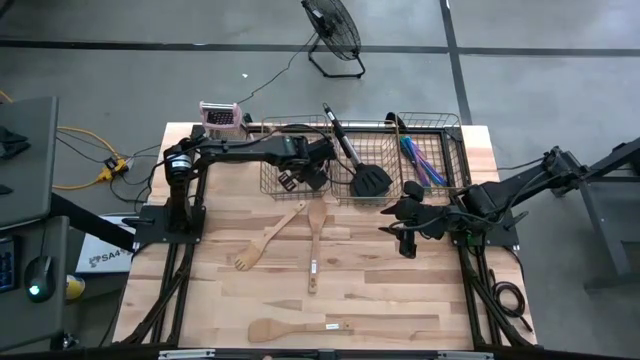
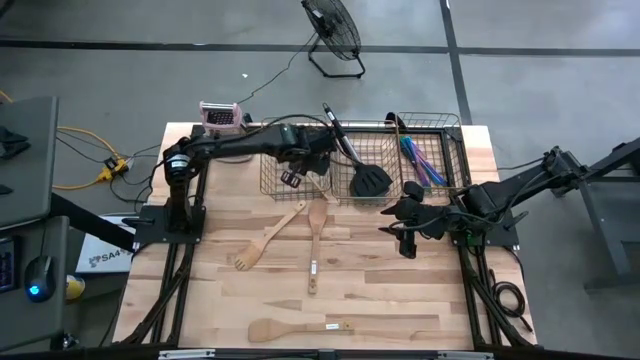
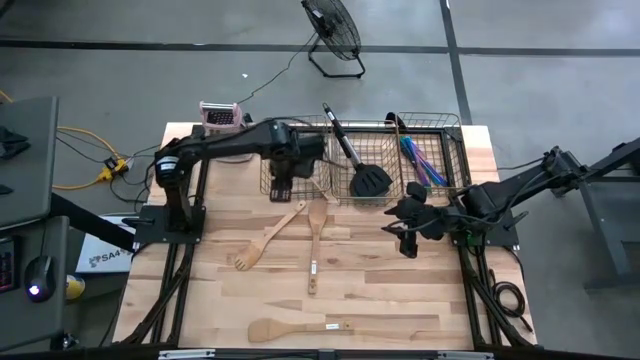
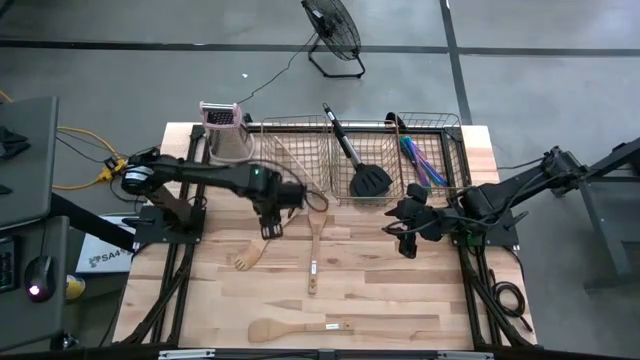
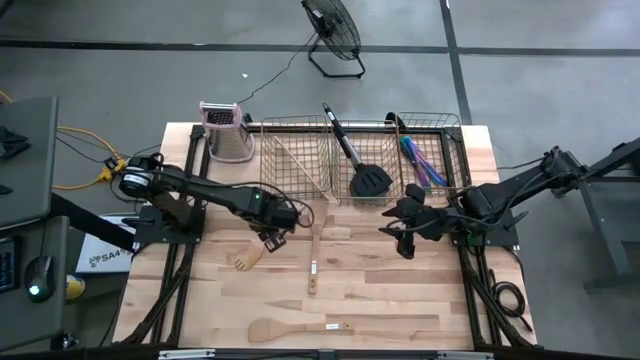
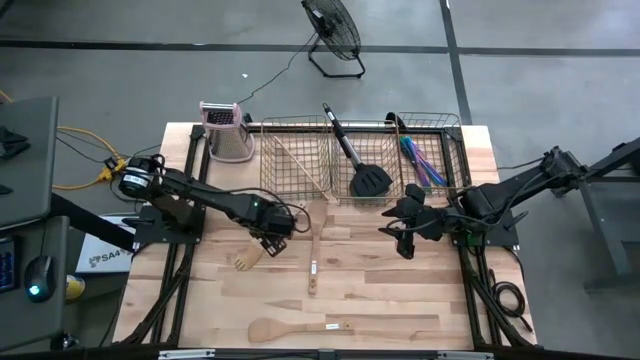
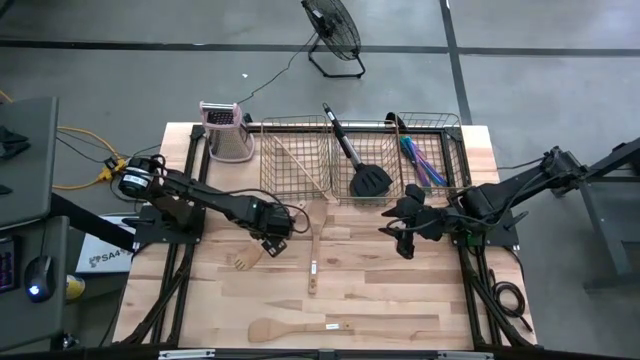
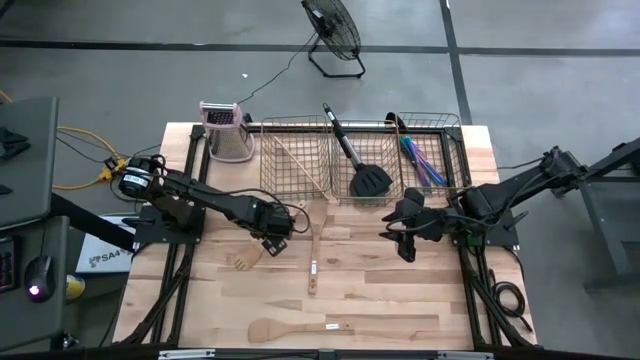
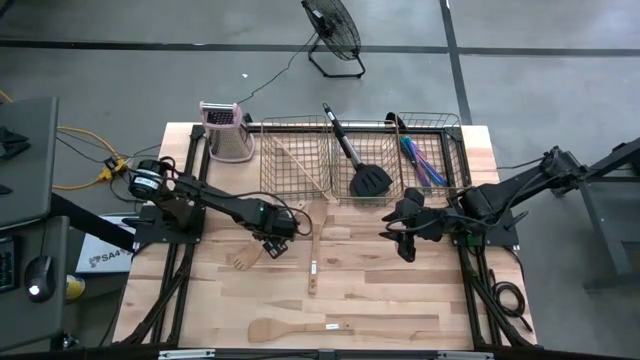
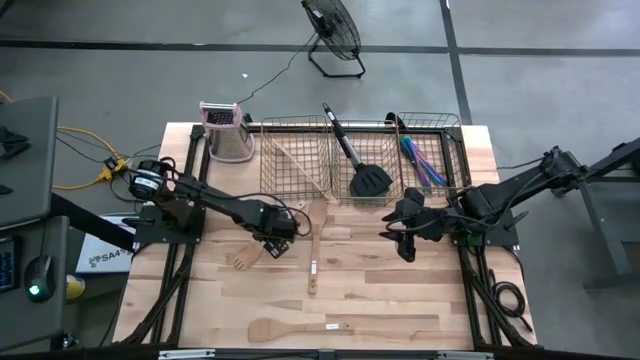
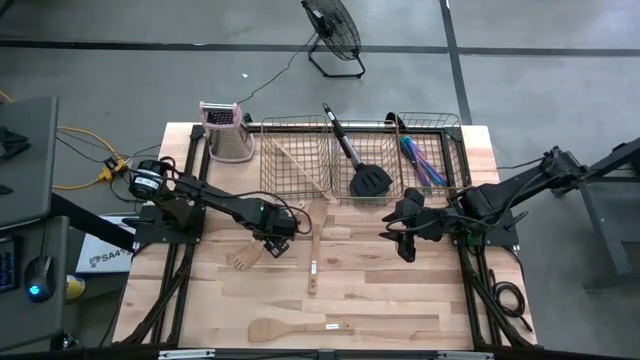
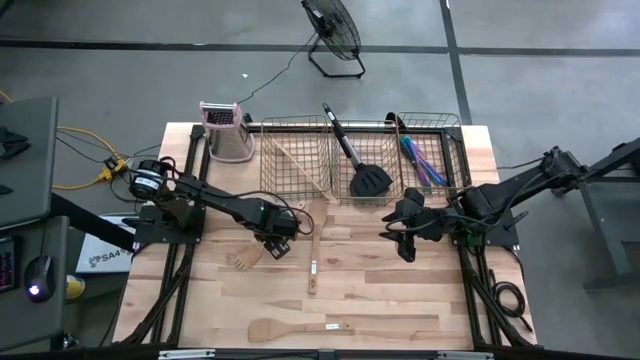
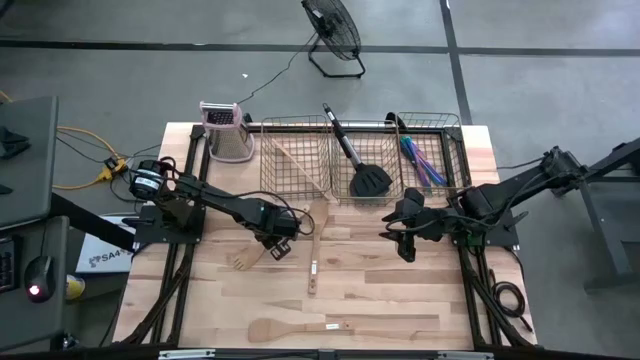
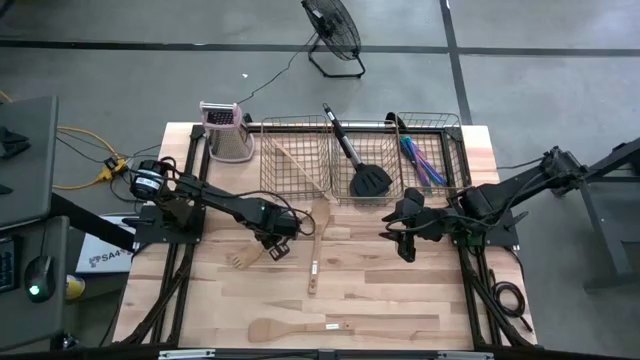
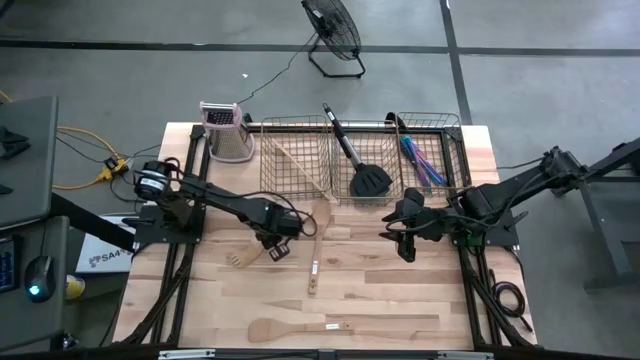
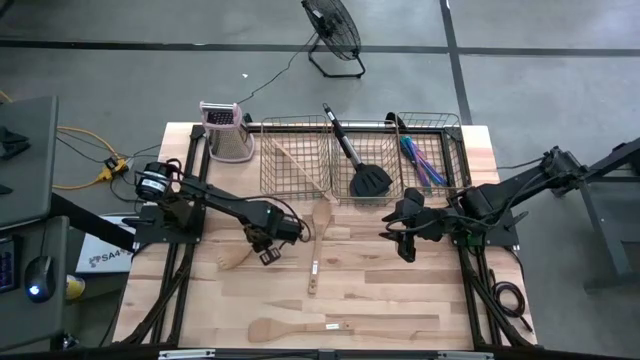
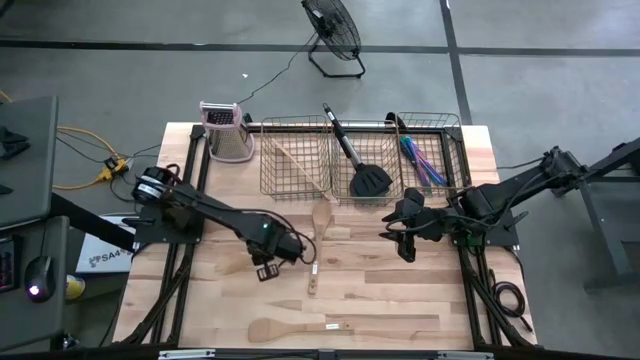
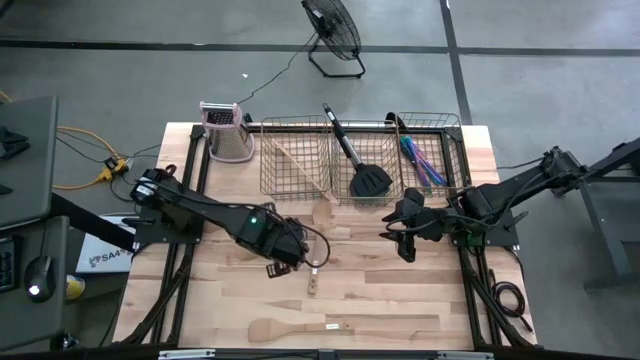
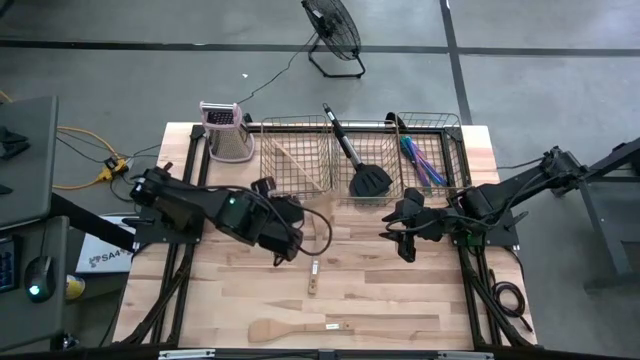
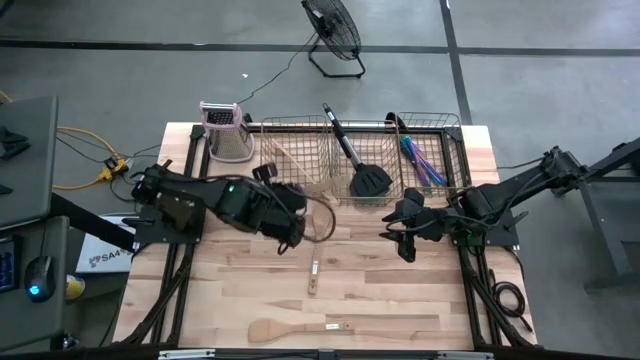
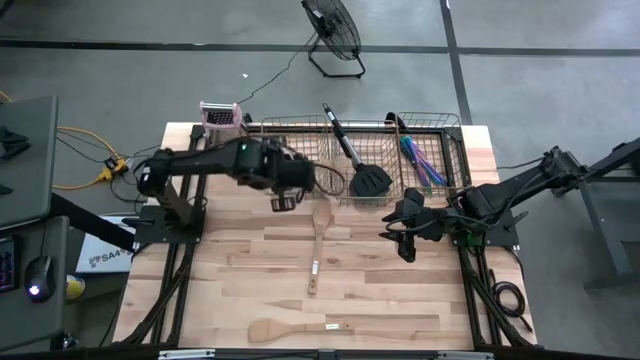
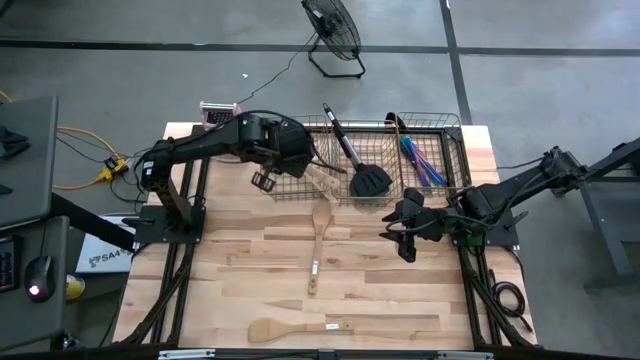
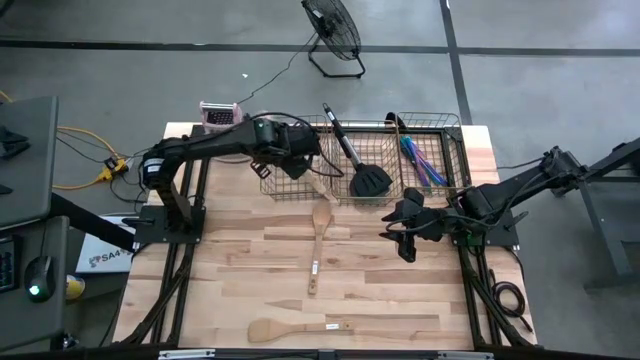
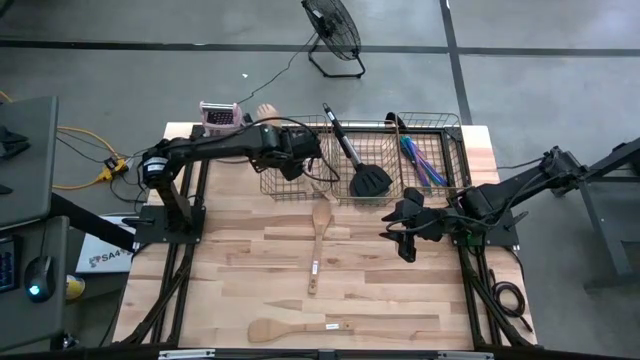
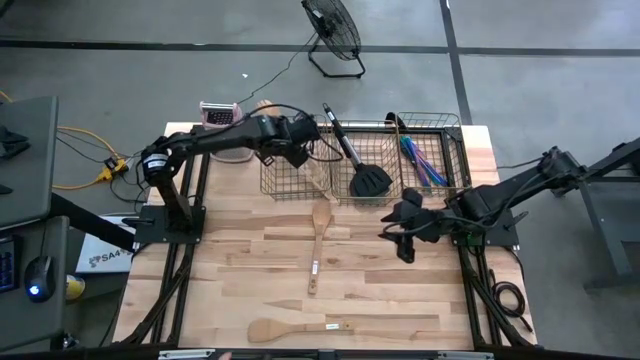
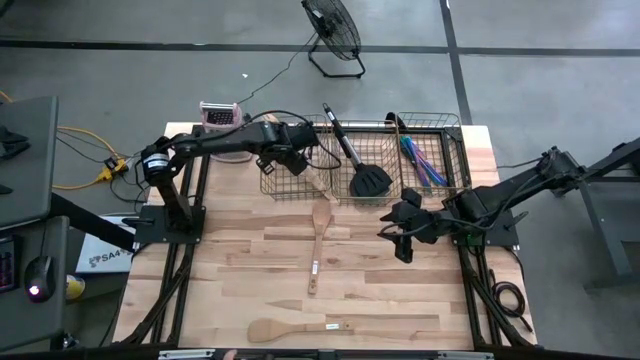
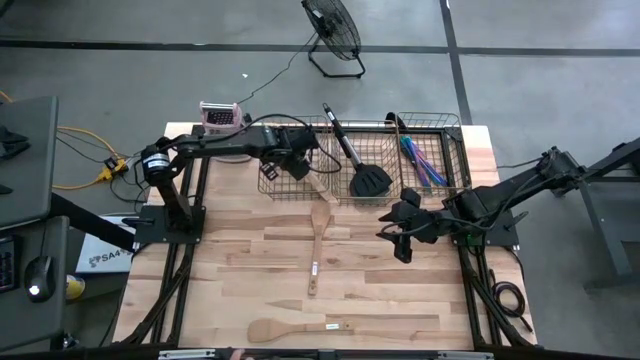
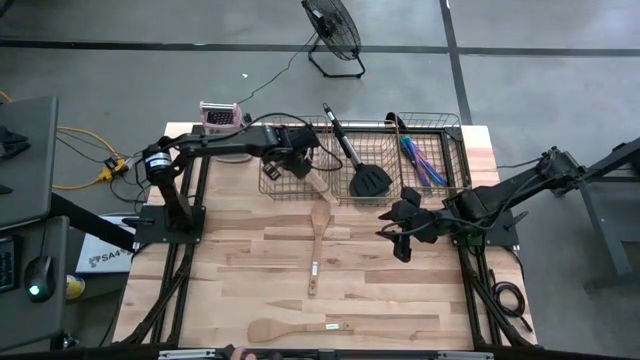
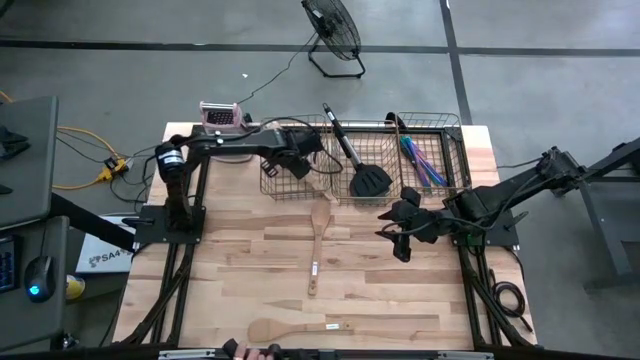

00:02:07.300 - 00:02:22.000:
Task: Pick & Place Kitchen Items
Put the wooden serving fork into the left mesh basket

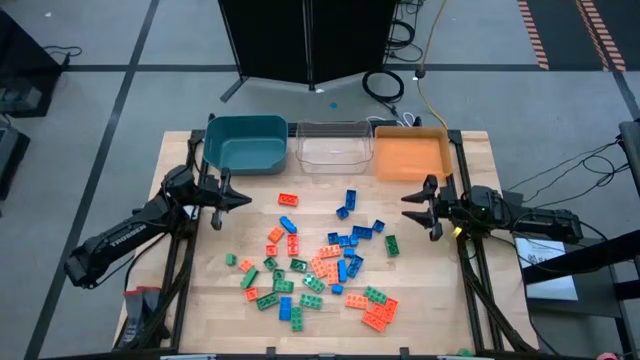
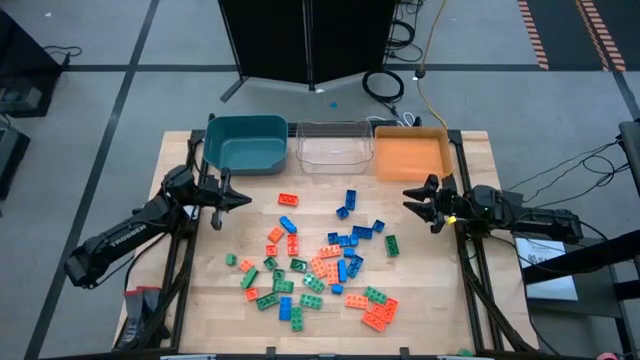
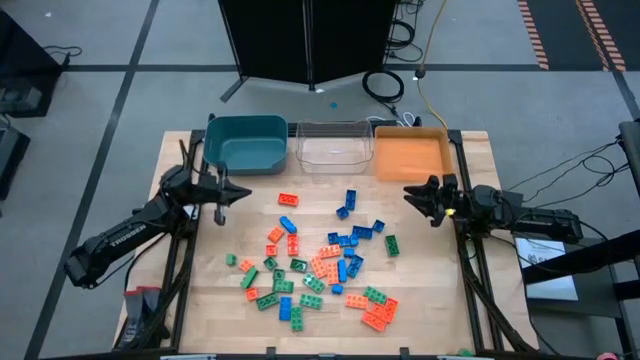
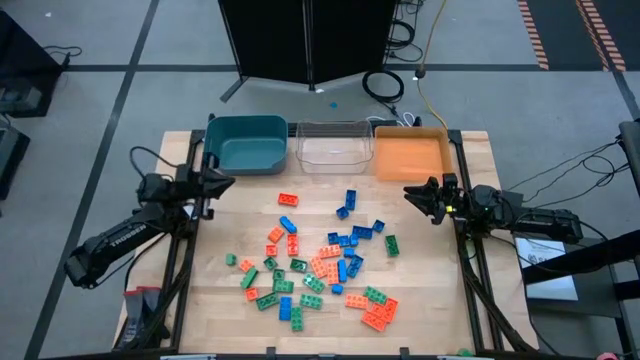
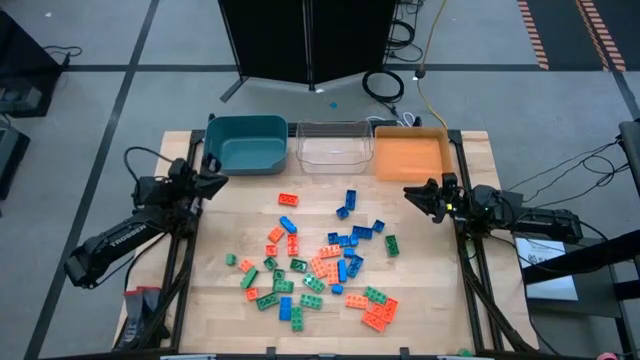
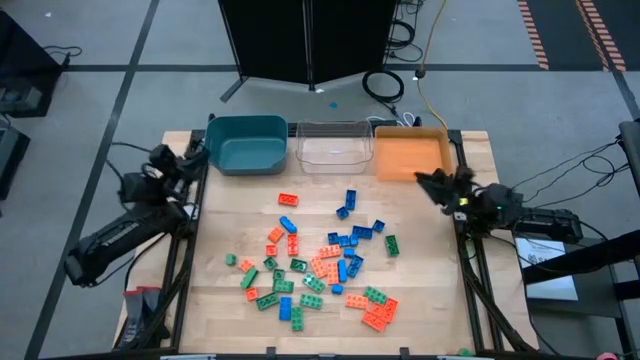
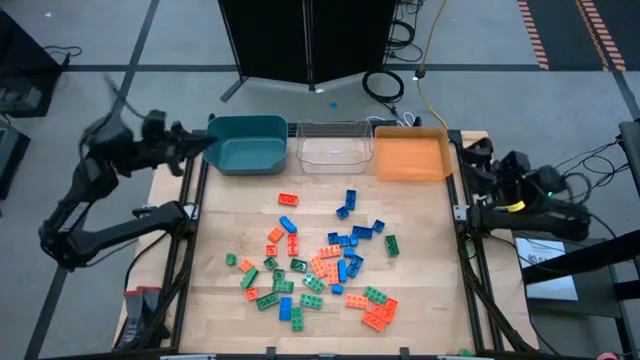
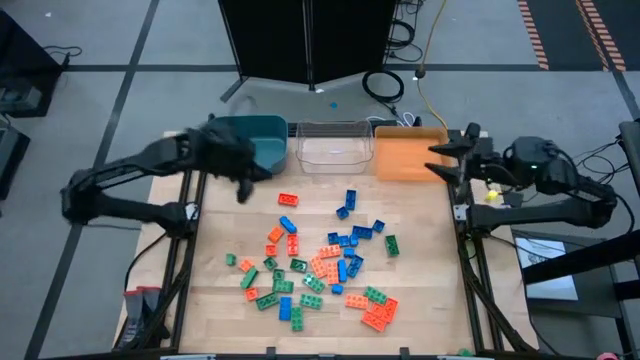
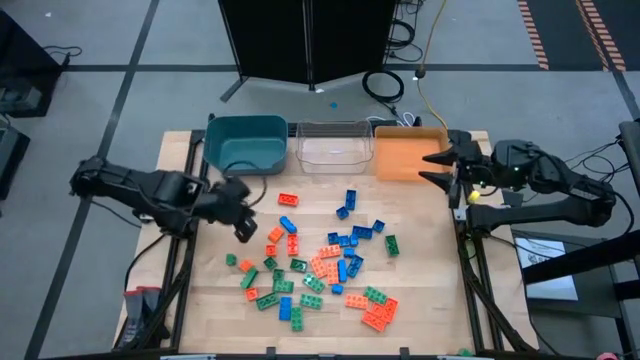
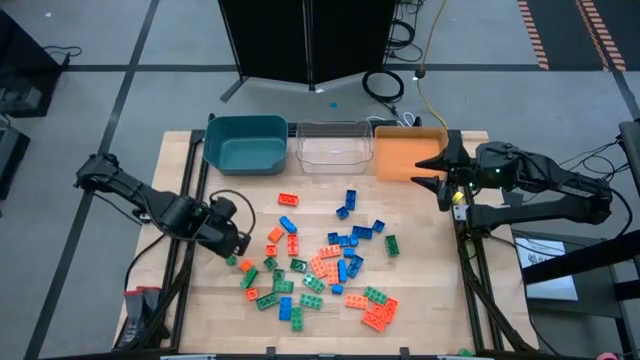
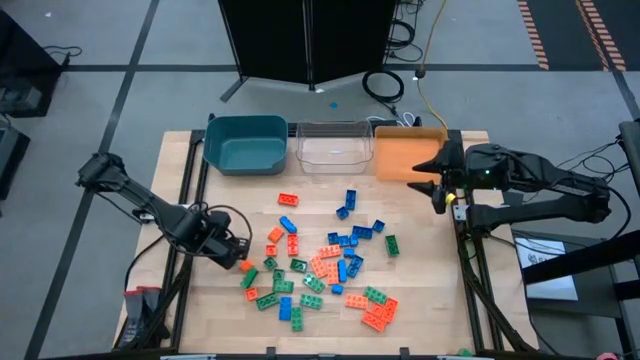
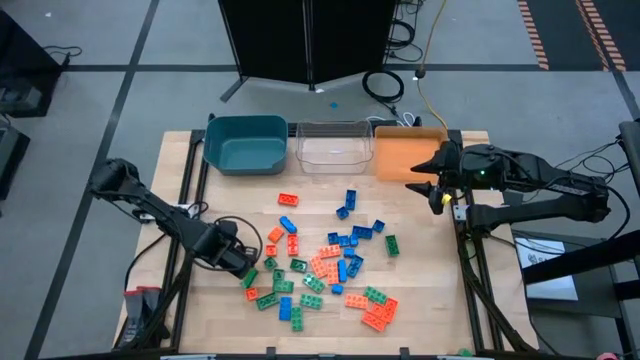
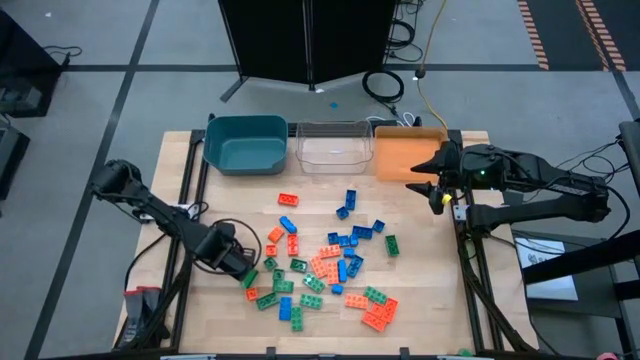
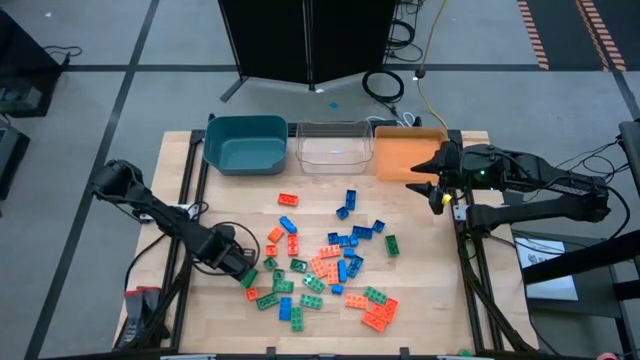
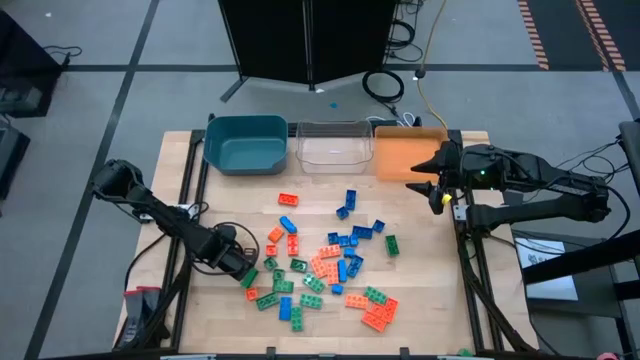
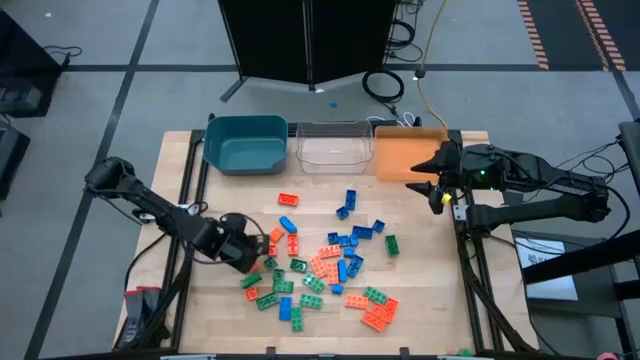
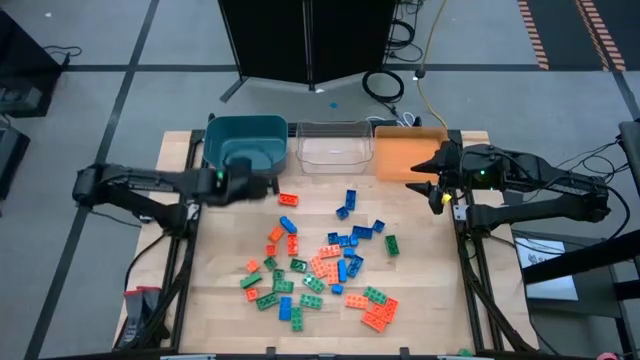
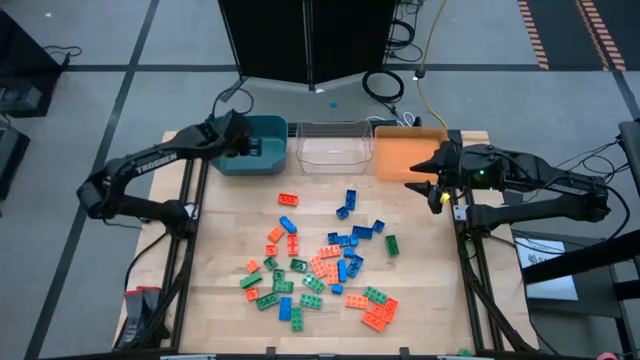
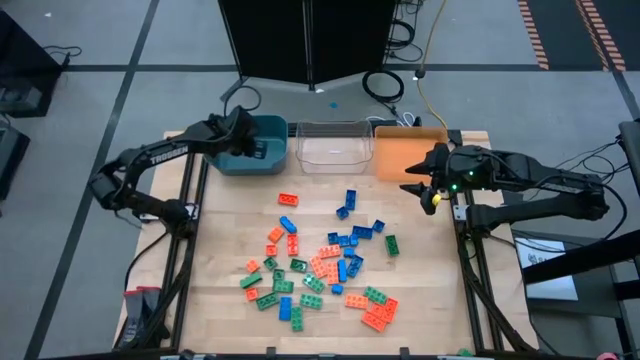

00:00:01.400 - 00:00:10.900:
Task: Sort blocks
Put the green game piece into the blue bin
